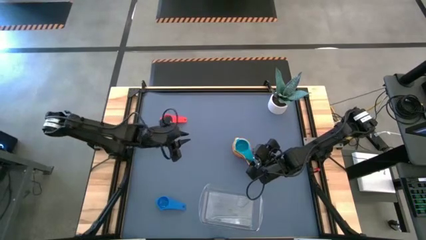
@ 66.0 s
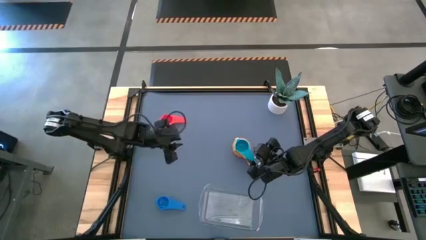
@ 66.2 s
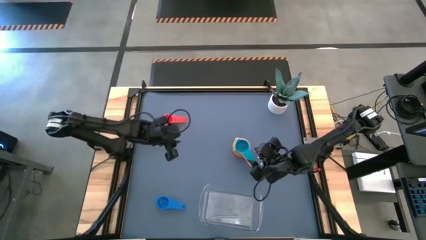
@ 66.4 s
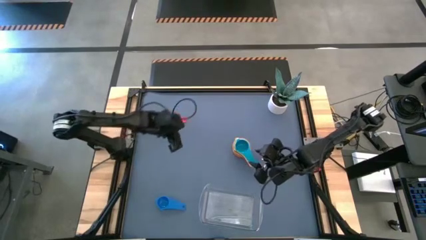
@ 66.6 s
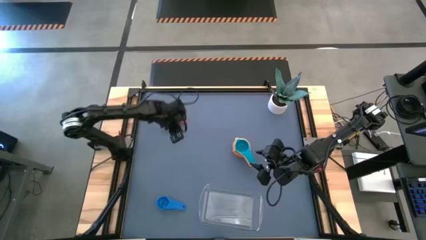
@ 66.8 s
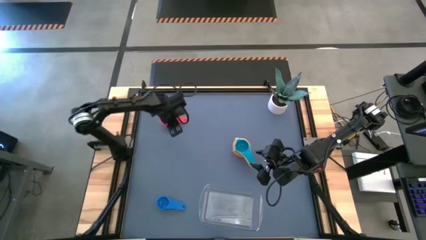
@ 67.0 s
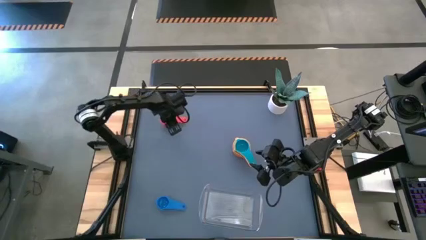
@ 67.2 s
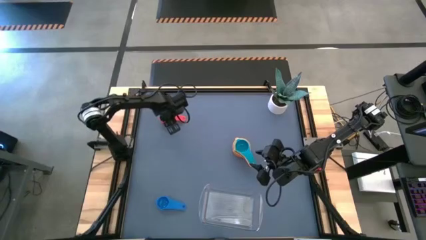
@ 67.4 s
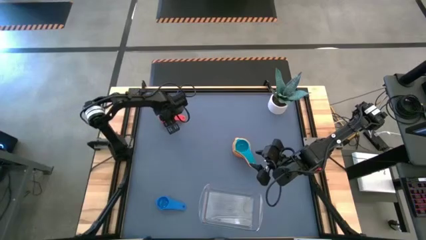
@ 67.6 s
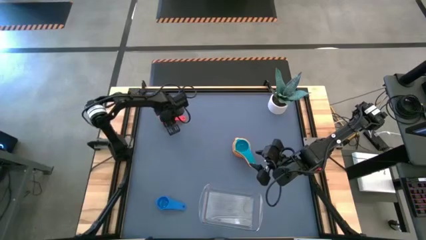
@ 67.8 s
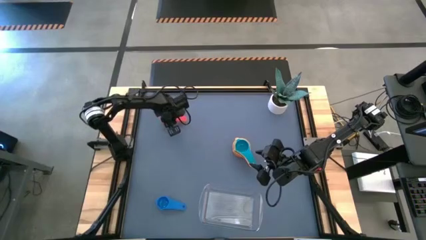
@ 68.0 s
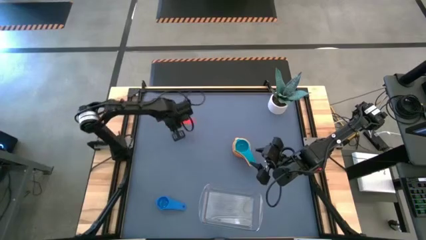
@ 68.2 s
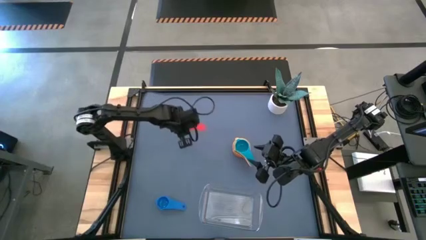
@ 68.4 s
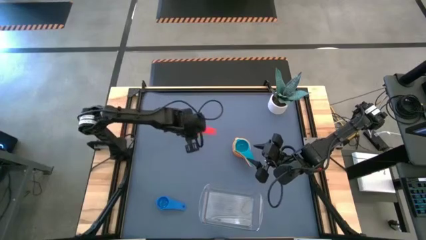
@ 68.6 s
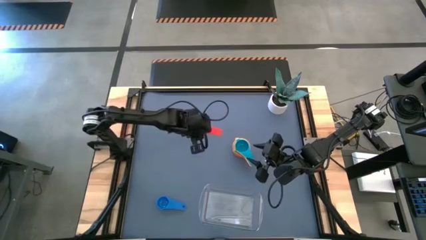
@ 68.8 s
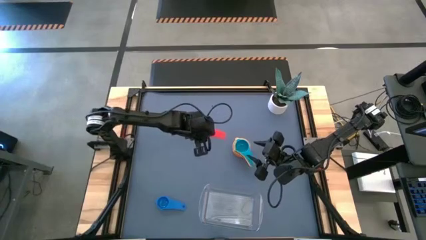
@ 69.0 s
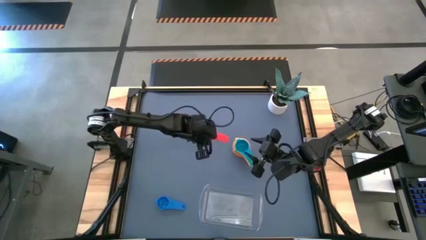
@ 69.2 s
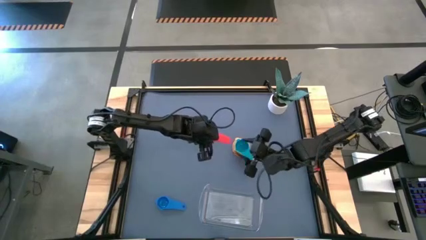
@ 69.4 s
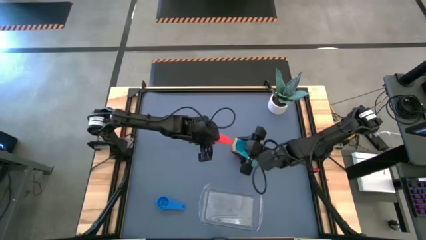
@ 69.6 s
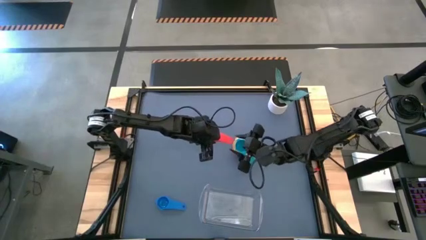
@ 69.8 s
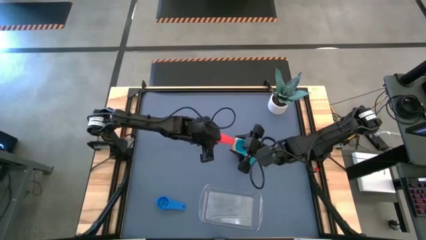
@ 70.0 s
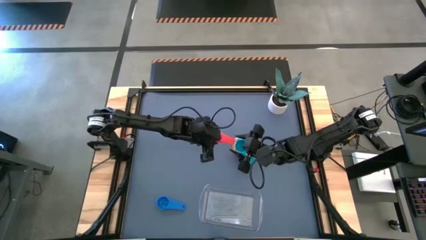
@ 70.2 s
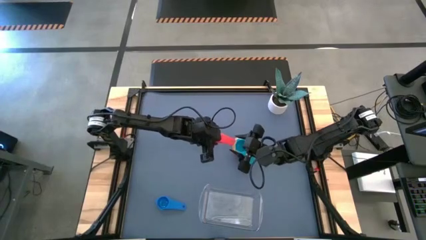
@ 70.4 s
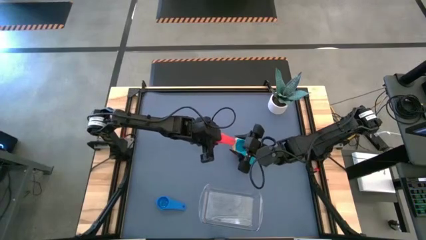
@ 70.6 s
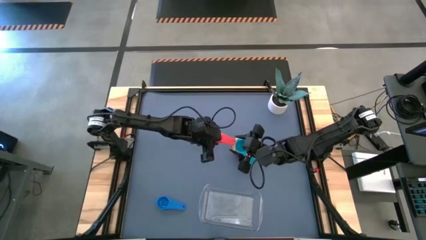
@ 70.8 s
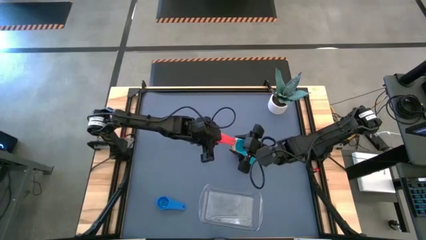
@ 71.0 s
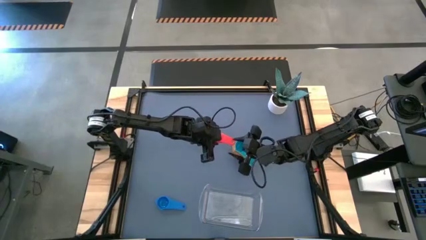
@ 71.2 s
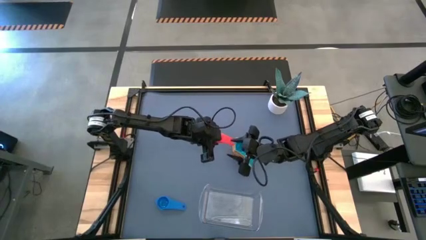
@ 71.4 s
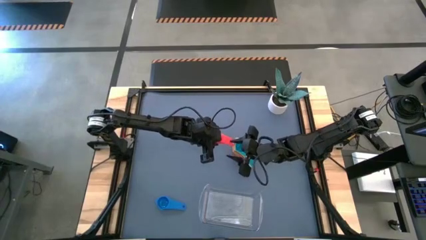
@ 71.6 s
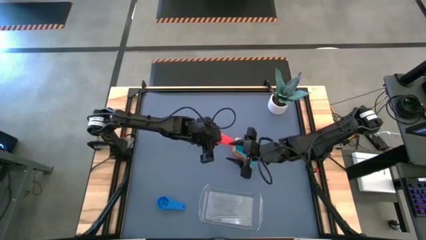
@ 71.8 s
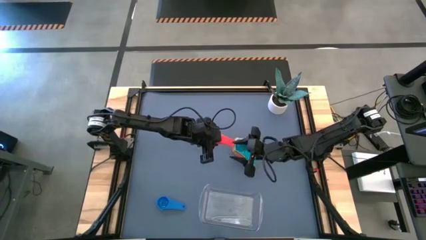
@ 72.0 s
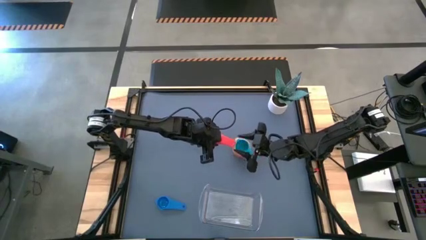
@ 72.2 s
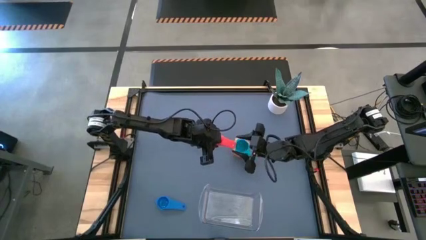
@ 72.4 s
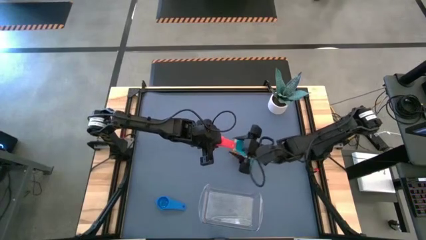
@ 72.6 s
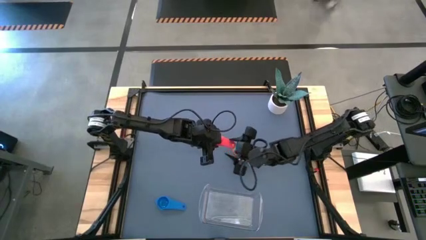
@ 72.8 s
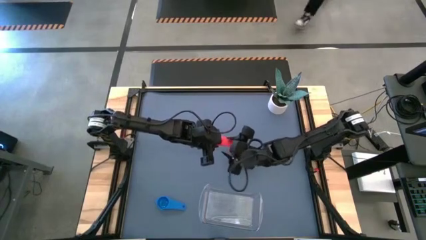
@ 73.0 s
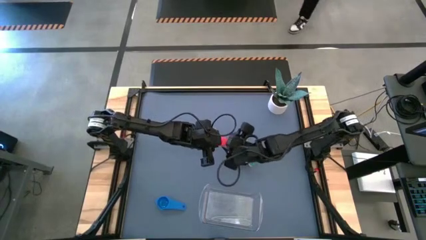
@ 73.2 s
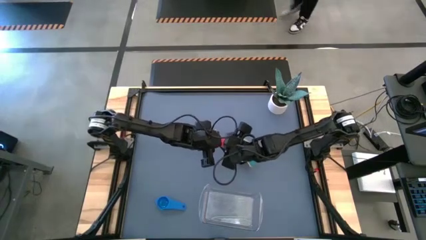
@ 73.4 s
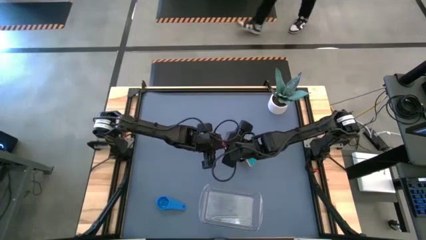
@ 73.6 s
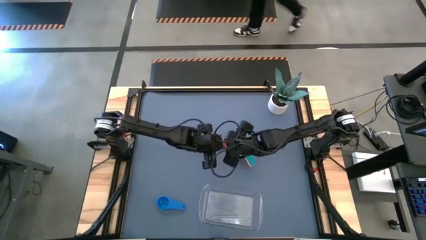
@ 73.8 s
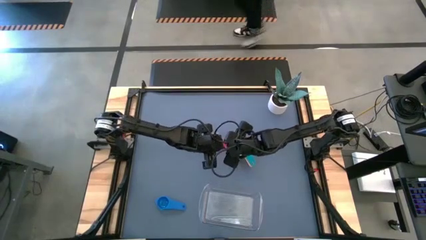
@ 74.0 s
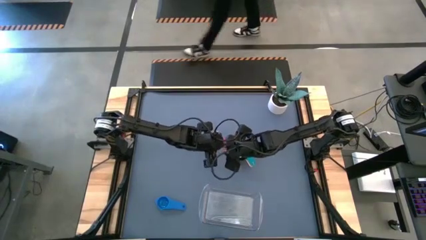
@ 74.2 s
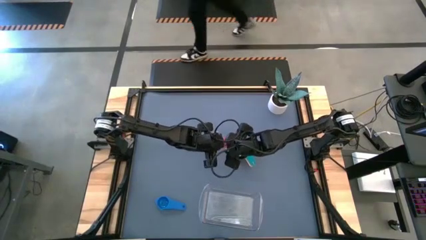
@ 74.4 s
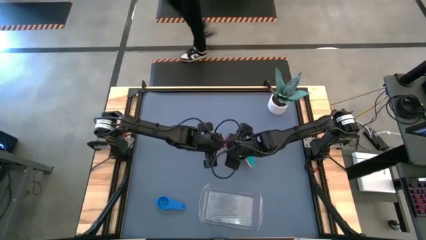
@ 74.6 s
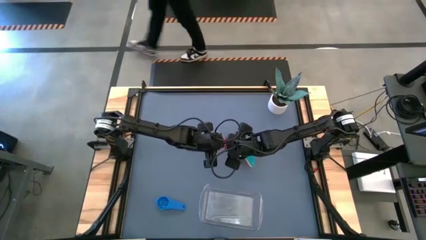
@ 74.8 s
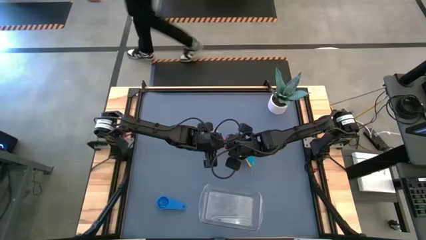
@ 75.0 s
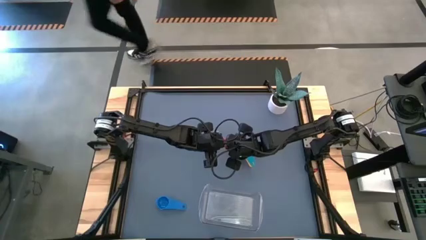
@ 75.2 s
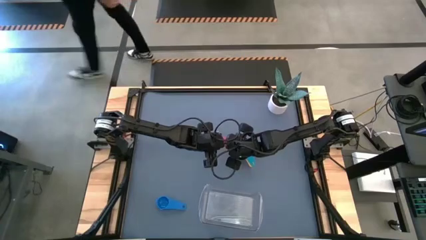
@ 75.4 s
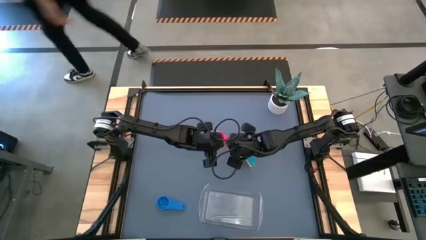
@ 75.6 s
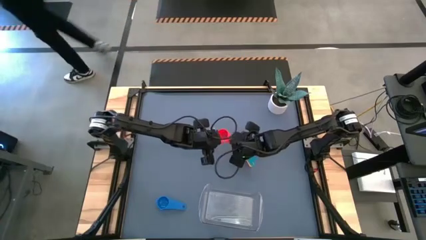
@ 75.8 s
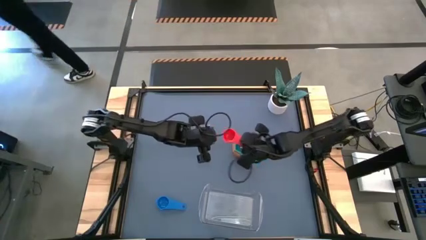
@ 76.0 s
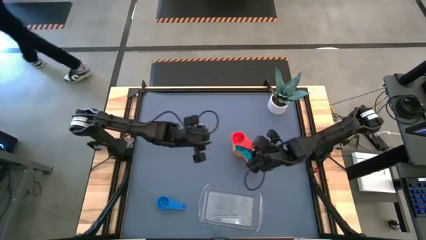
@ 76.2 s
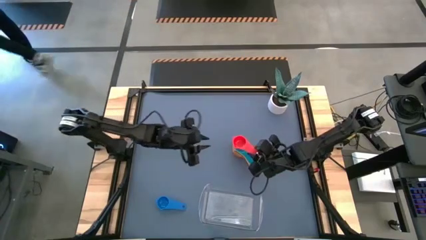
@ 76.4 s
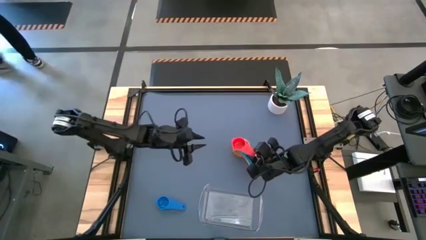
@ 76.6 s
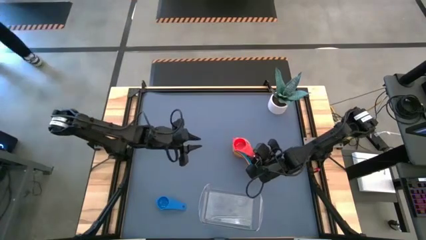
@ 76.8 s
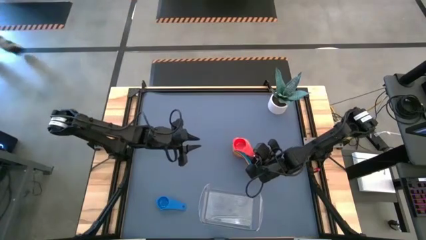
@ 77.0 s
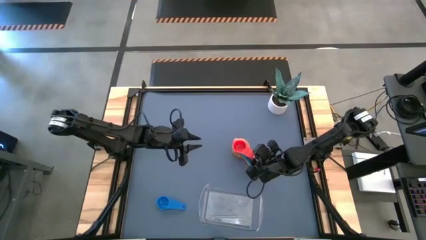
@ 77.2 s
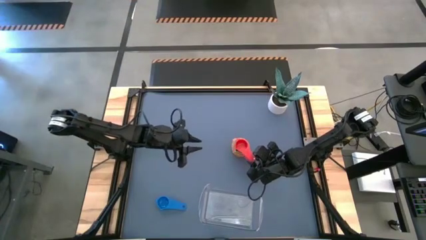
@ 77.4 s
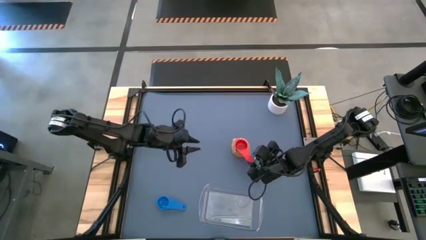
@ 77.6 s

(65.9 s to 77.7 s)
Task: Nest measuring cups in basket
Stack the orange measuring cup on top of the light blue measuring cup

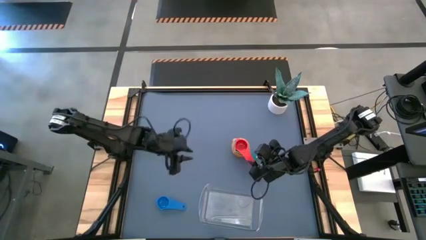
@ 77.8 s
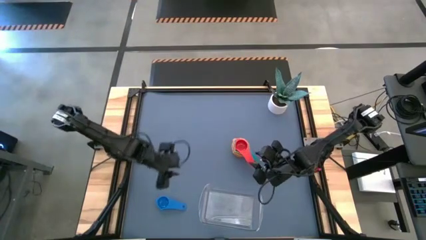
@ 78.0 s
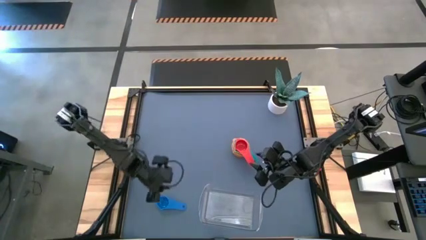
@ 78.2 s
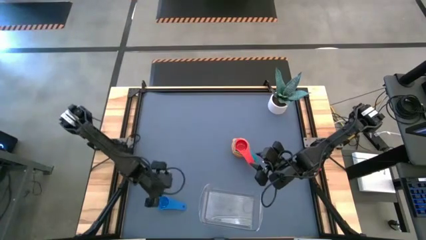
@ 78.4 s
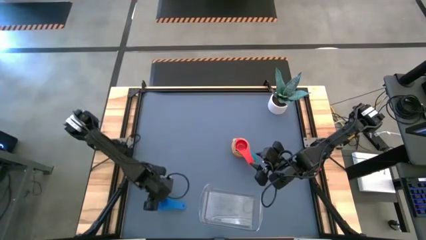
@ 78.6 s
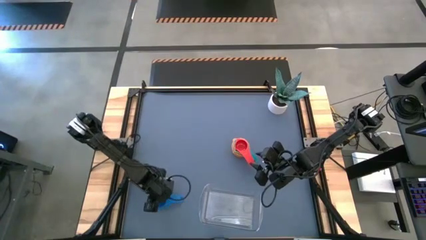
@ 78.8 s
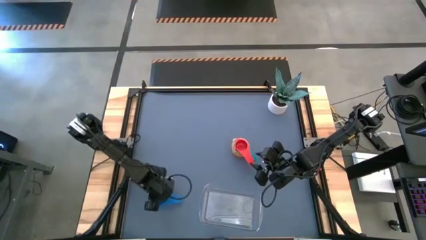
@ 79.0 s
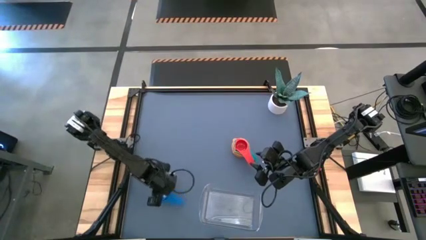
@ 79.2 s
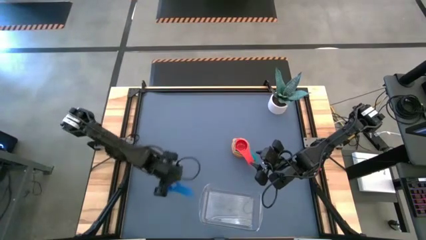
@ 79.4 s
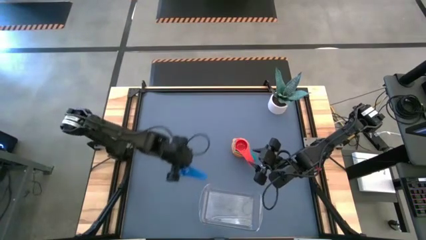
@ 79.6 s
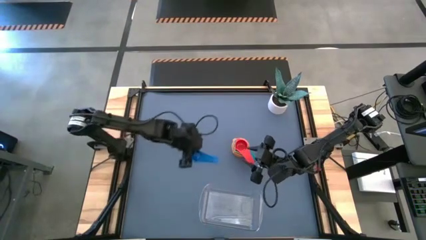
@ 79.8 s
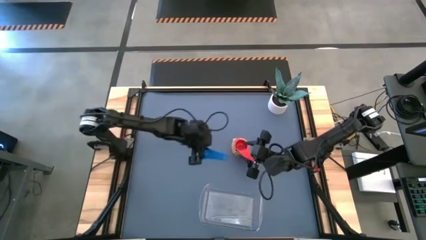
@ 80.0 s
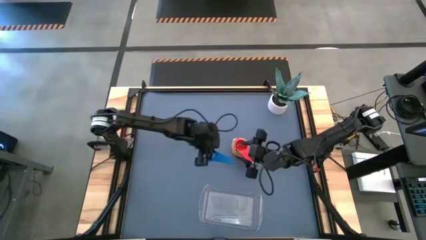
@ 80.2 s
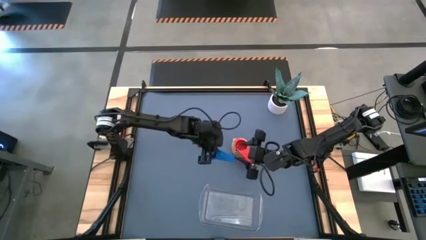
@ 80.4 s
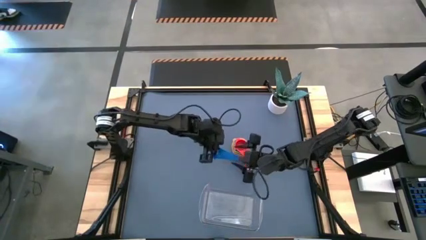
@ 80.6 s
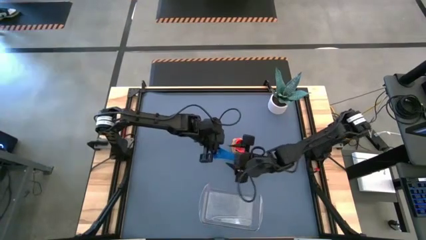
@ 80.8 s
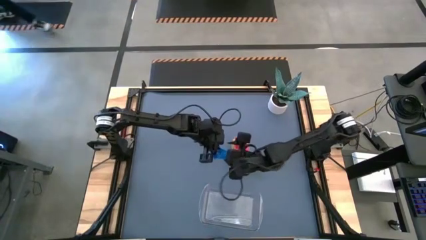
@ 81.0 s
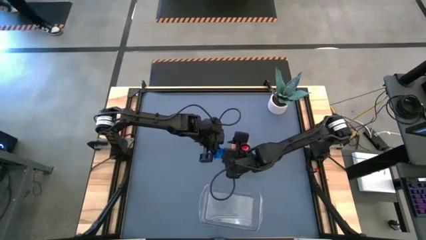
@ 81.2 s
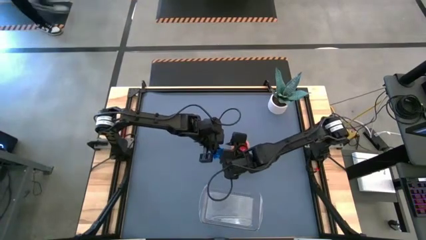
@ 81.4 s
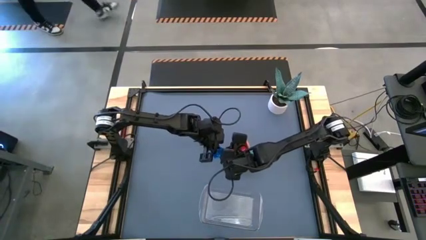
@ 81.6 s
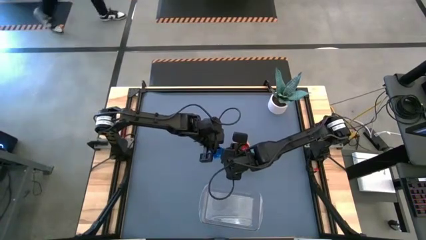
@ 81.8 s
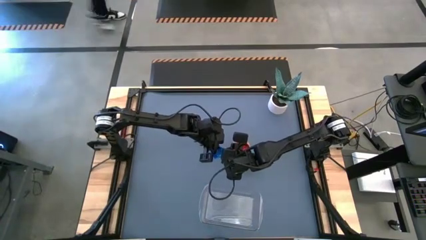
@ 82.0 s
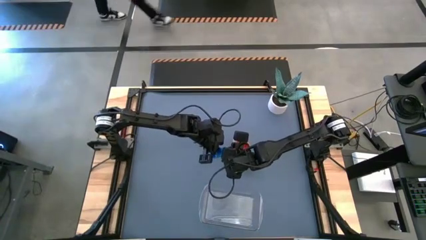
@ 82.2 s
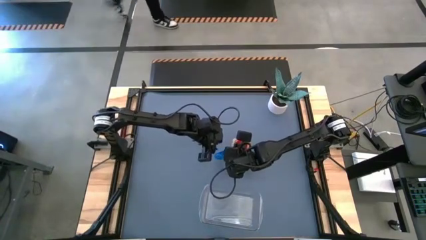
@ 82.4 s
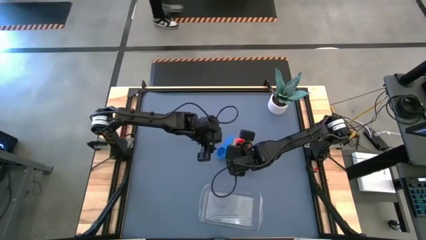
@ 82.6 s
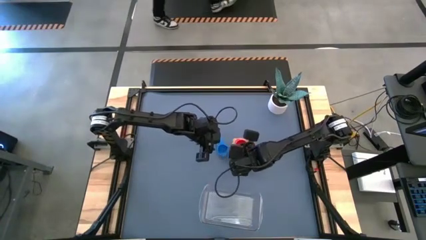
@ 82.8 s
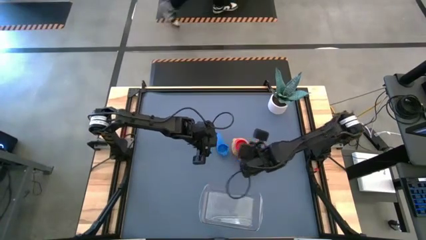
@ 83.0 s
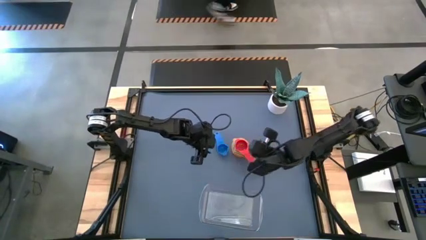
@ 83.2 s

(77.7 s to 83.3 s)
Stack the blue measuring cup on top of the orange measuring cup
